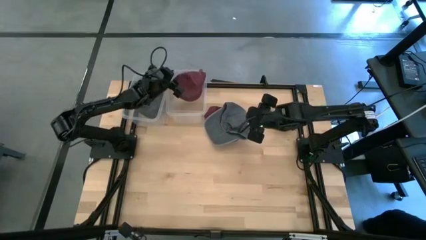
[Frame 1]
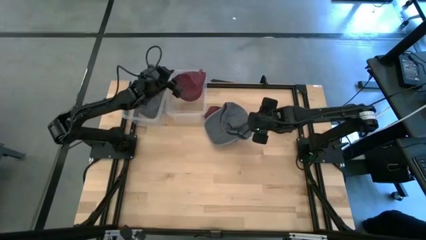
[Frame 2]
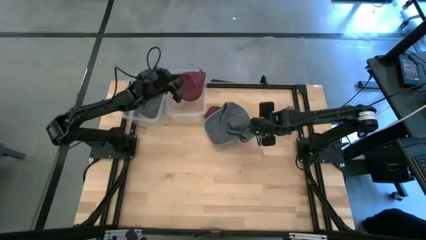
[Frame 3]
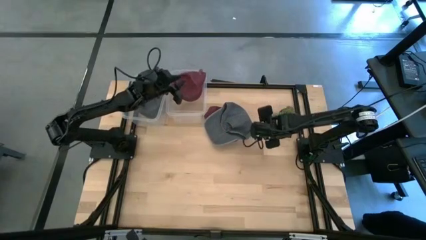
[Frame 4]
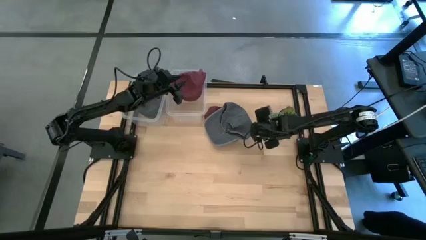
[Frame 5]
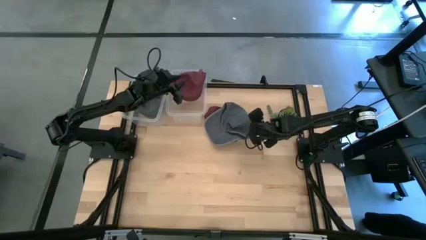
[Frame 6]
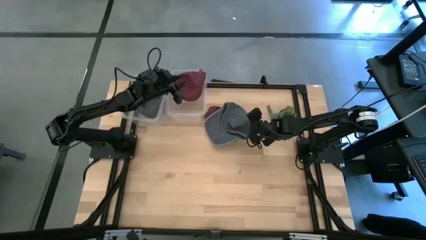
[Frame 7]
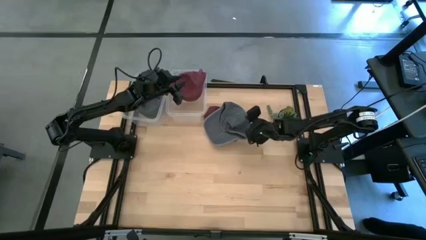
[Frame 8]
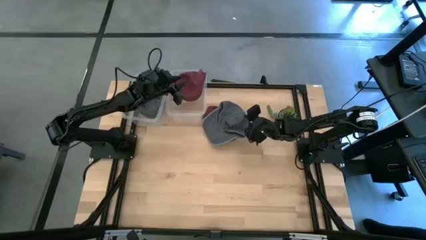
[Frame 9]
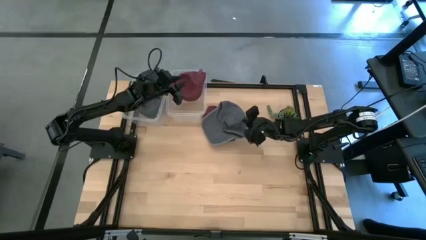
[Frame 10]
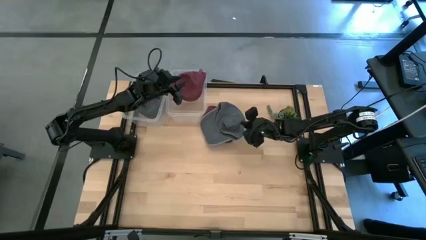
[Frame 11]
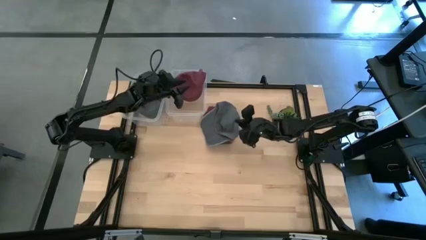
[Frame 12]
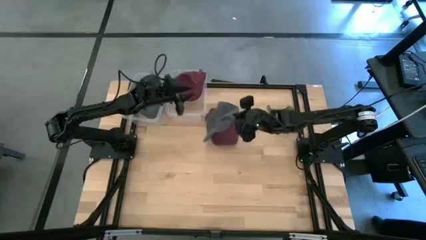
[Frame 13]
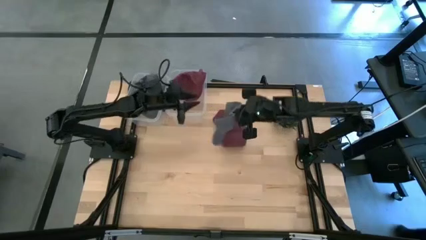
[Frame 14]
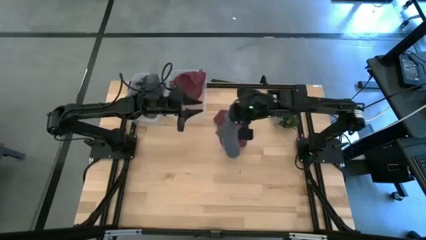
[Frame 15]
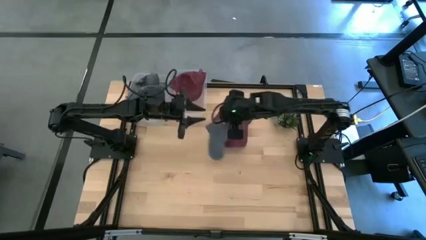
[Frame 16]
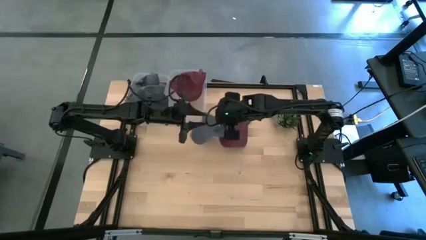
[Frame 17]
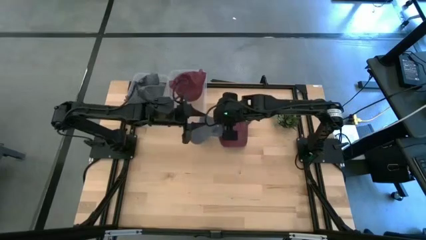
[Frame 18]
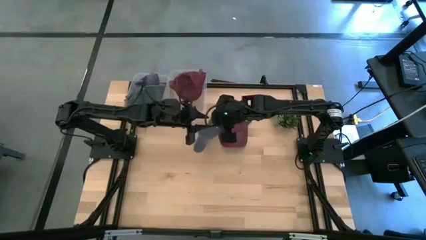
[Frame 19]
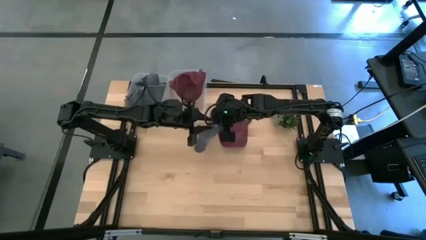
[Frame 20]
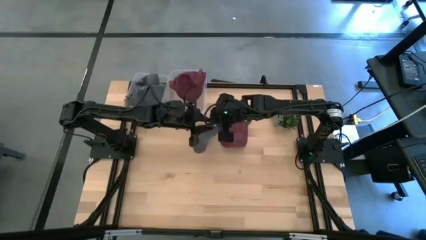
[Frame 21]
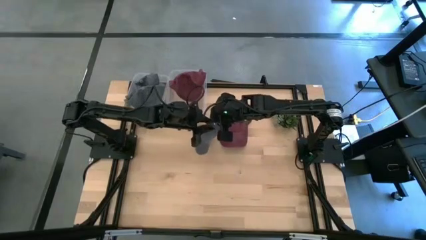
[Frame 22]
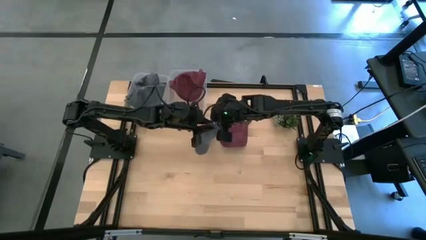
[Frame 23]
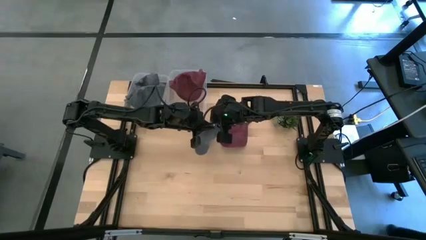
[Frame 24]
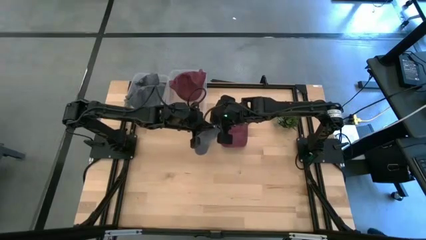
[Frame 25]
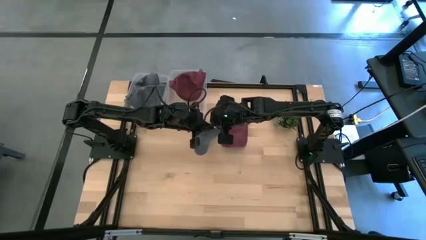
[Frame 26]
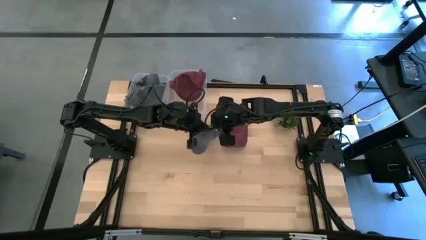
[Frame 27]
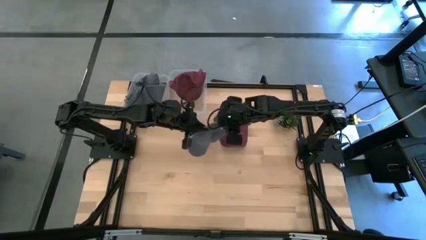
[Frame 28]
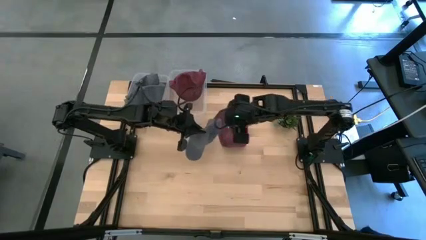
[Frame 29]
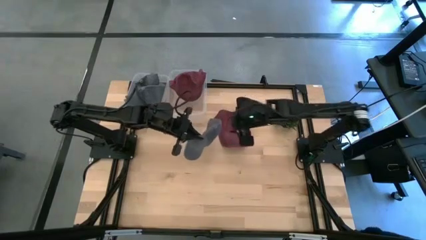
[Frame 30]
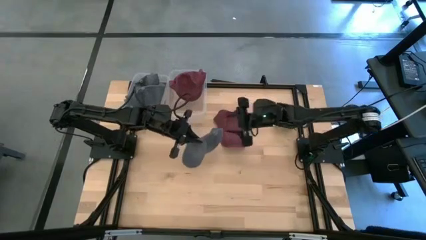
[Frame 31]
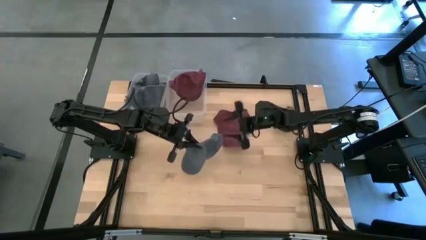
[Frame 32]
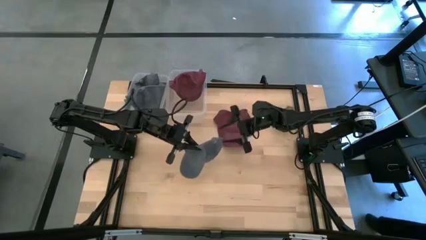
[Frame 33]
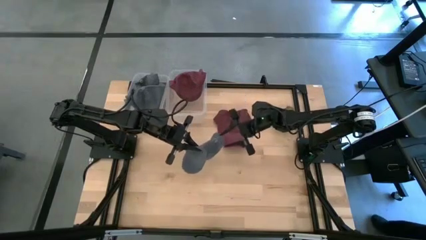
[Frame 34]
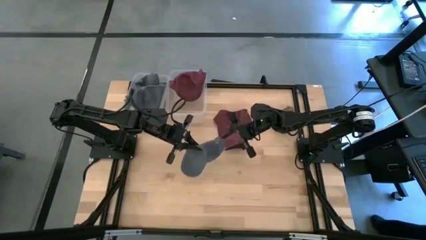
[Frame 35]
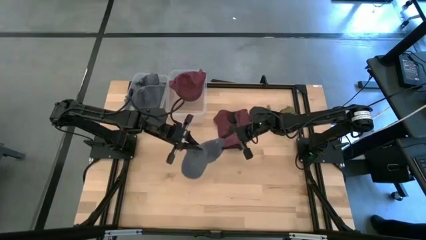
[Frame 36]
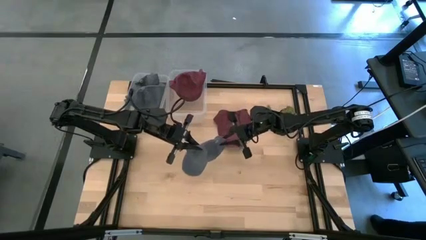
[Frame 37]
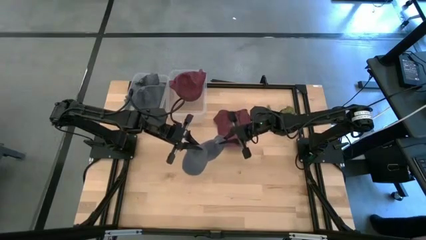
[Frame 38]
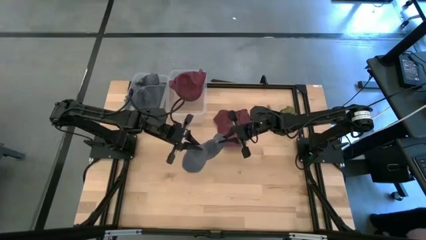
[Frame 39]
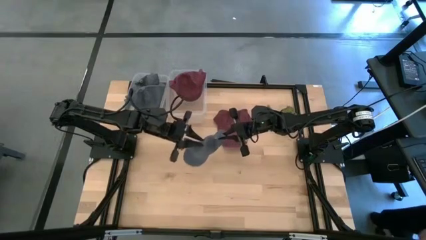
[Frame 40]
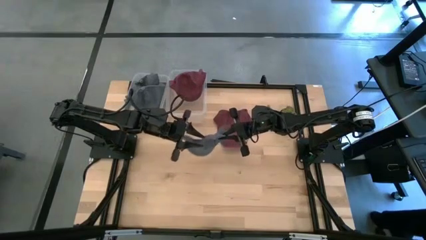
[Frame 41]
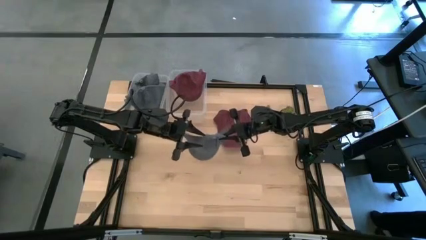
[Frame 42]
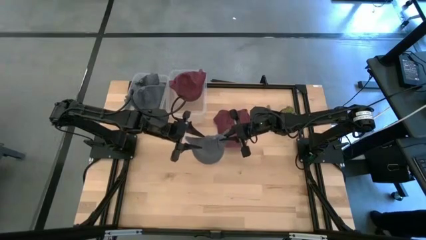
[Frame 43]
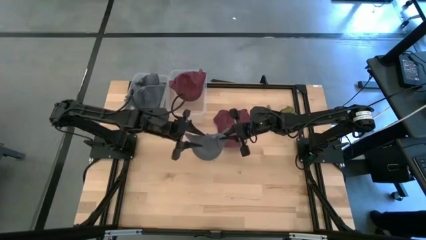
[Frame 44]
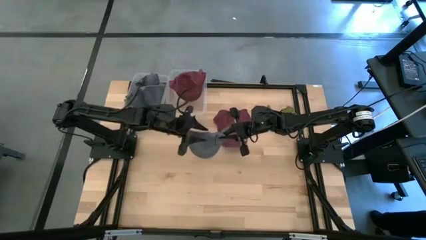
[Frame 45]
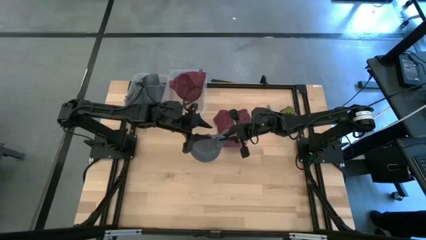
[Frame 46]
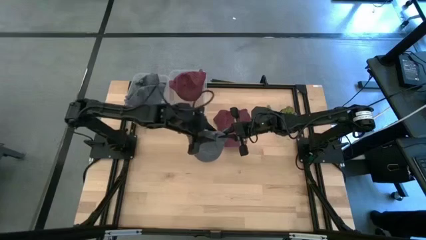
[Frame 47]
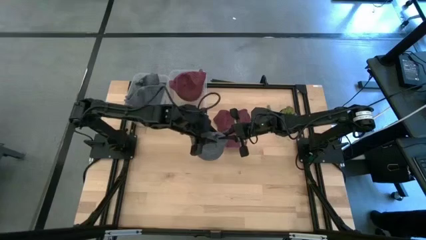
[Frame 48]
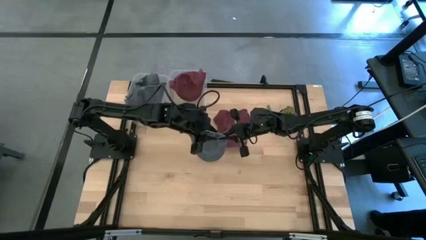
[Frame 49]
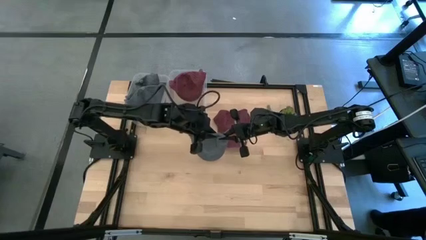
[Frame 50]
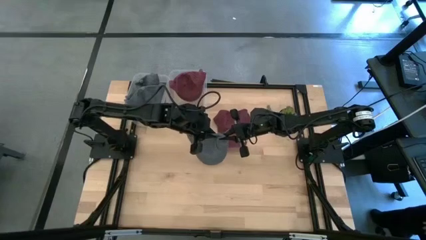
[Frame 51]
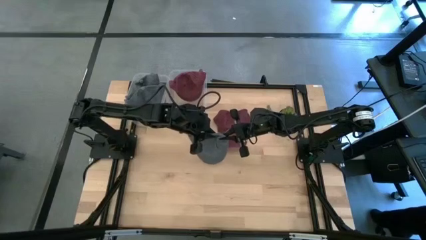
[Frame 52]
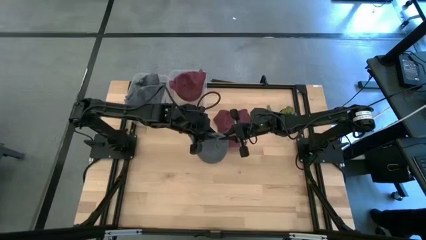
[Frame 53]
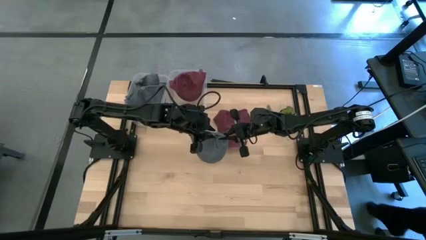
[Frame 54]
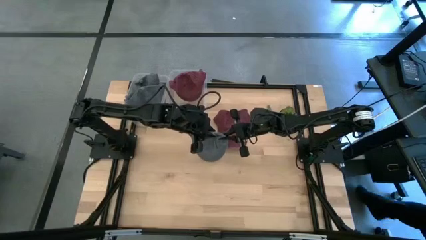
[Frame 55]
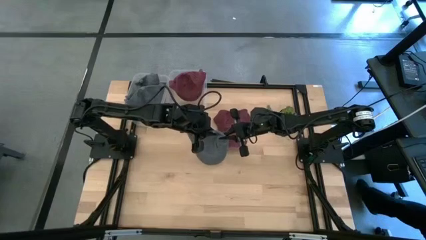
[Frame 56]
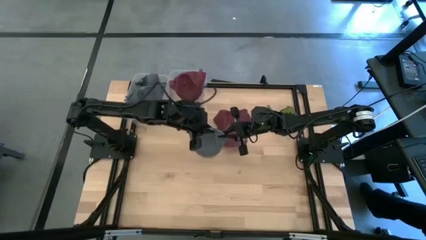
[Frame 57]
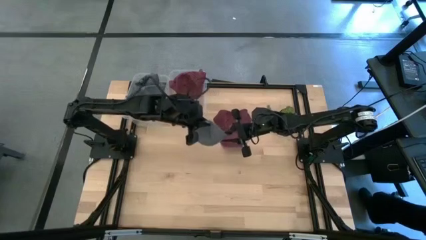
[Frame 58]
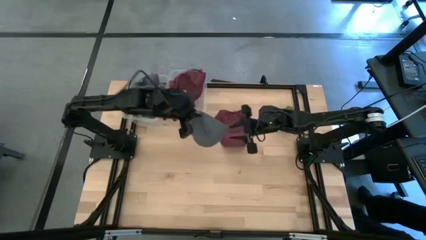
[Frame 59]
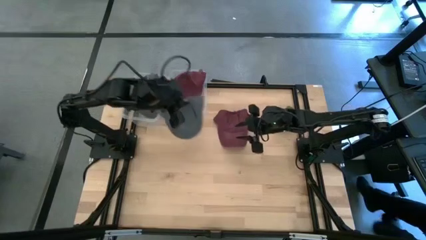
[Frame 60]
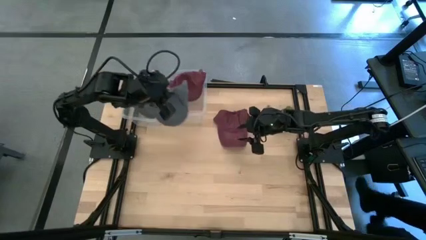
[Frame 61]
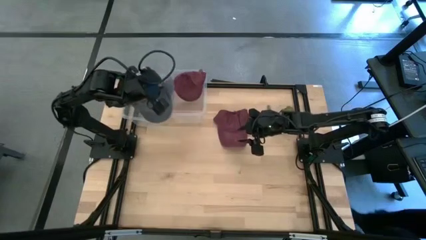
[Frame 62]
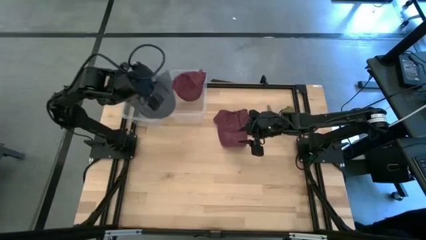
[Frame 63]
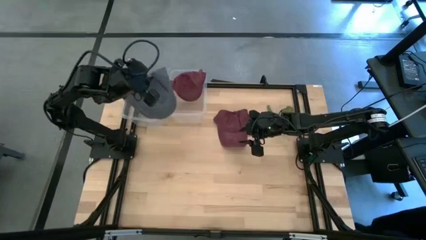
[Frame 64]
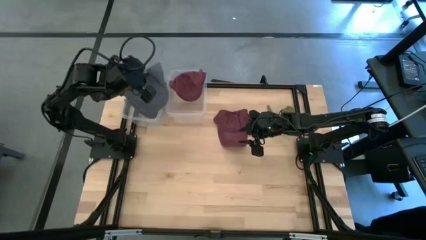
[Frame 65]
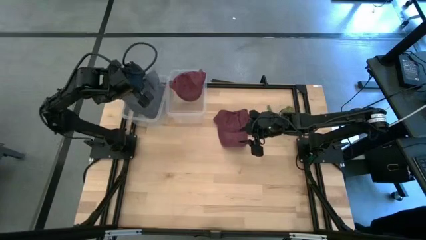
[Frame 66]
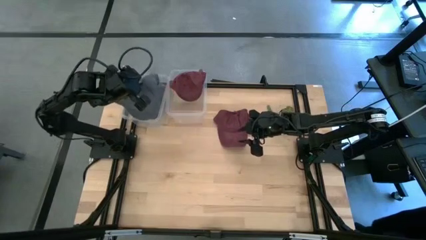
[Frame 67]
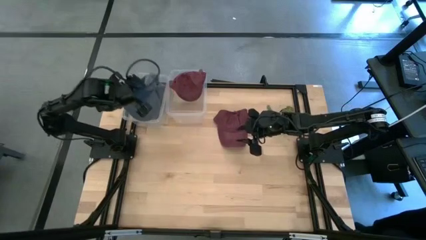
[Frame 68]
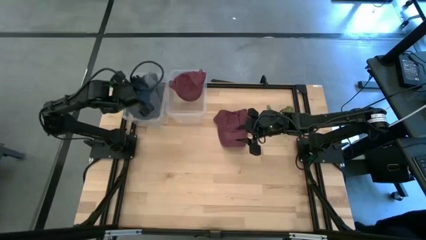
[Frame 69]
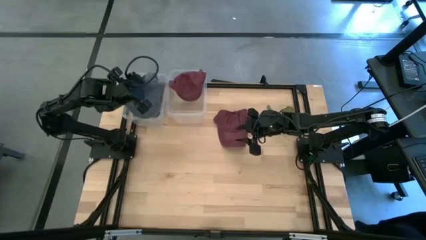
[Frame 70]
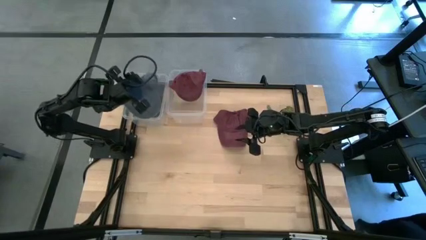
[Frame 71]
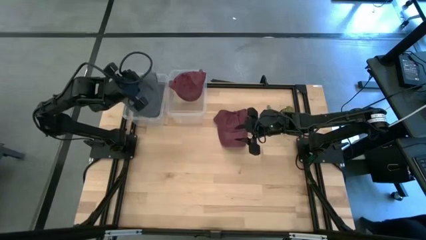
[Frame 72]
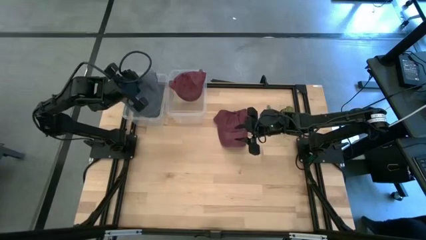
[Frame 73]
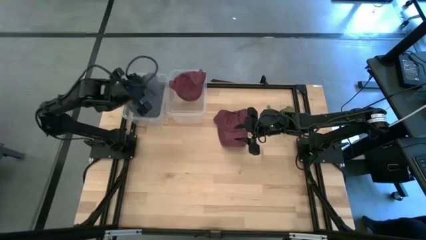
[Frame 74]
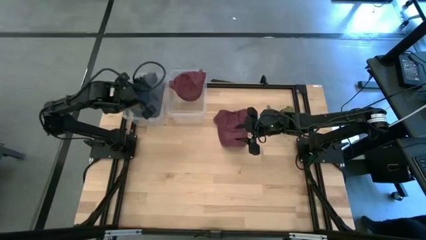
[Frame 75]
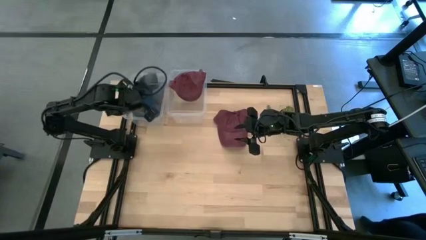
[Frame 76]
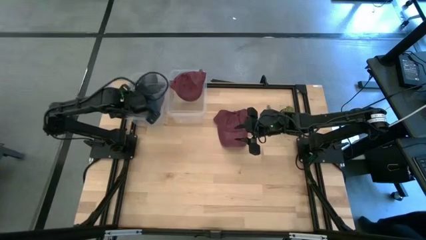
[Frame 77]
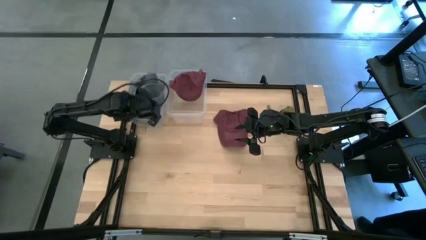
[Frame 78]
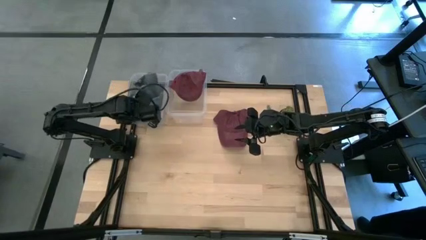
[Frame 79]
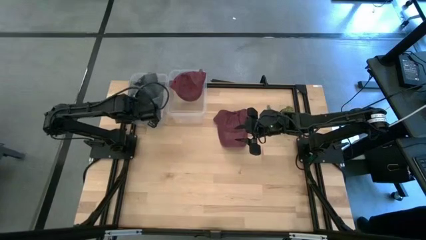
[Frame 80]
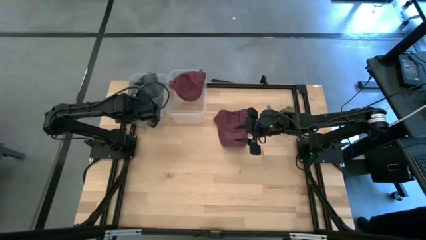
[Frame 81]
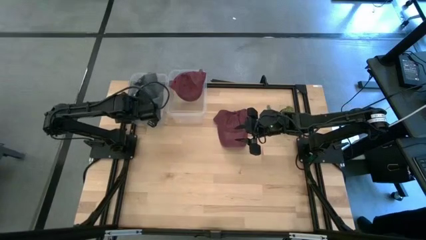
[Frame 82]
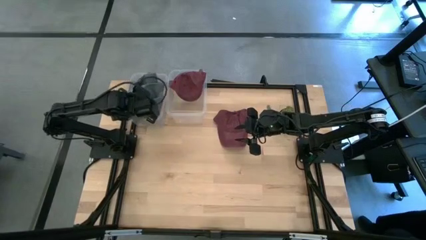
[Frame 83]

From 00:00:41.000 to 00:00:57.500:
Task: Pick & Place hat
Put the gray cap into the left transparent bin
